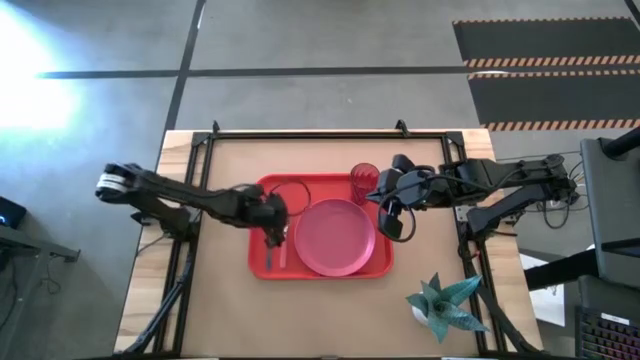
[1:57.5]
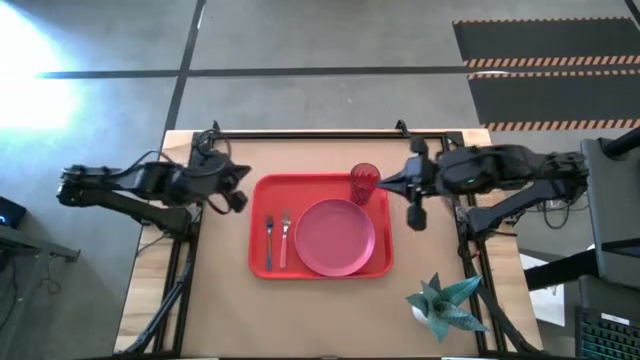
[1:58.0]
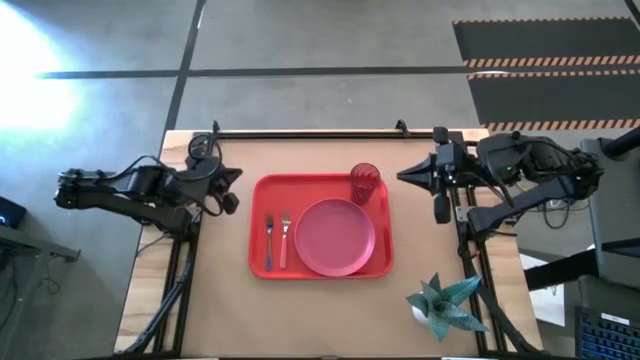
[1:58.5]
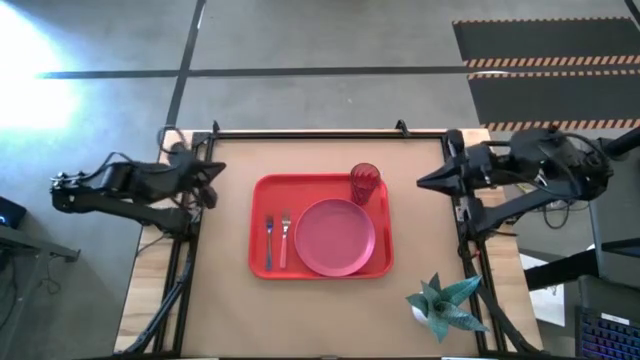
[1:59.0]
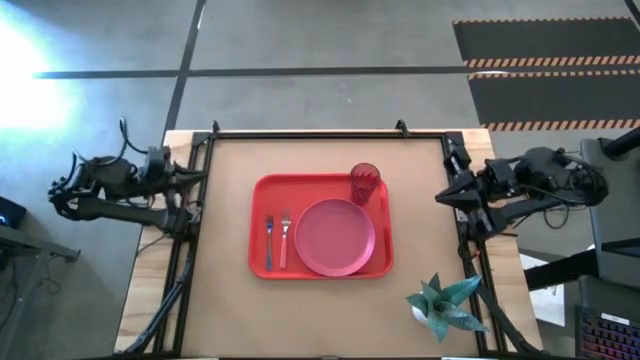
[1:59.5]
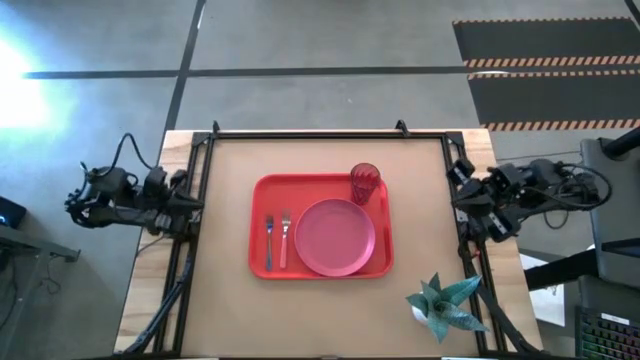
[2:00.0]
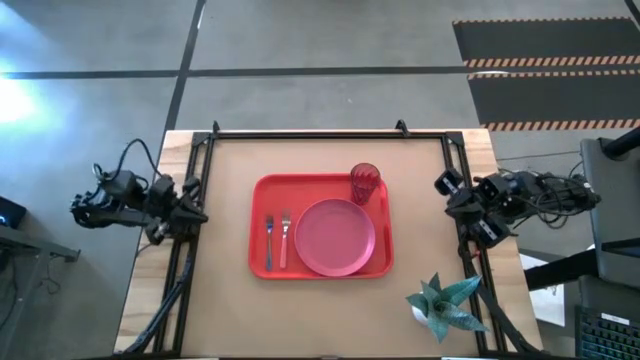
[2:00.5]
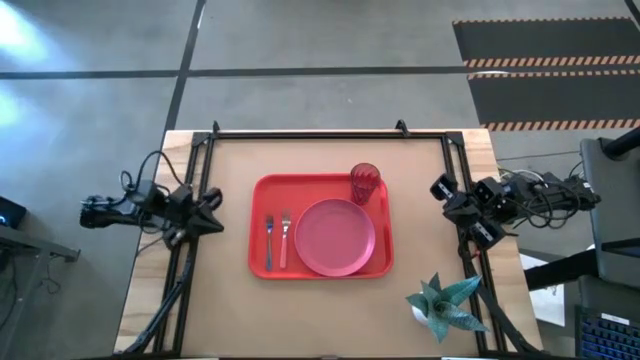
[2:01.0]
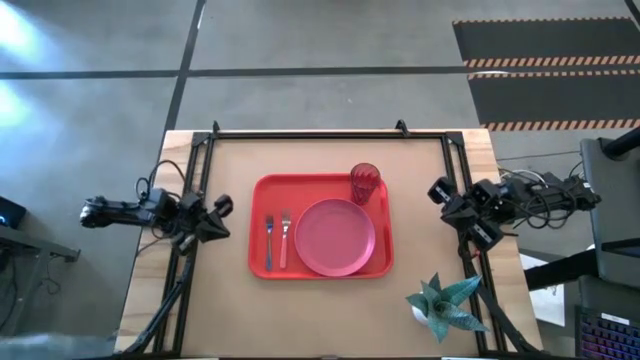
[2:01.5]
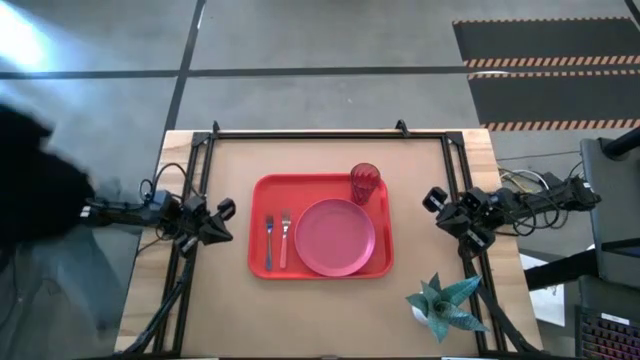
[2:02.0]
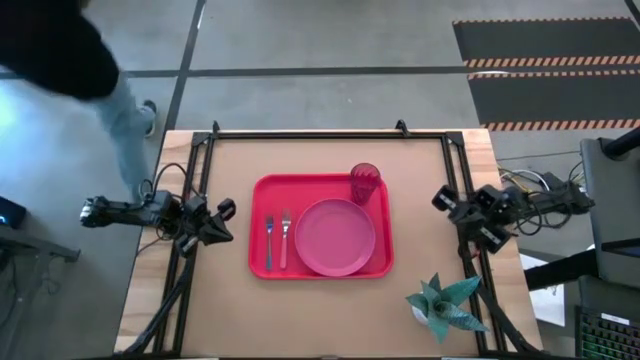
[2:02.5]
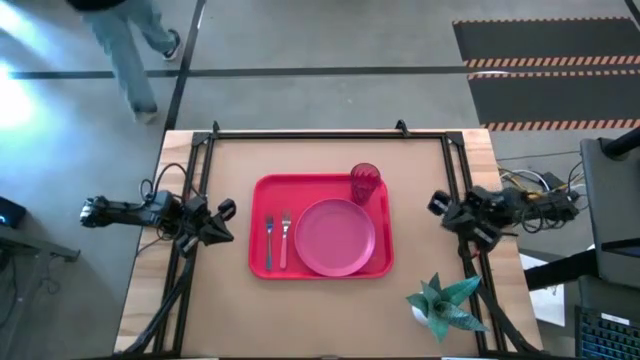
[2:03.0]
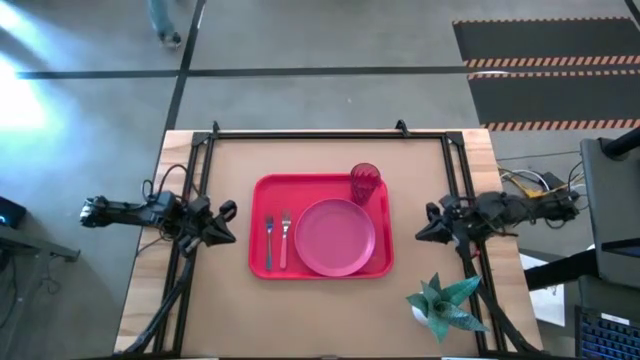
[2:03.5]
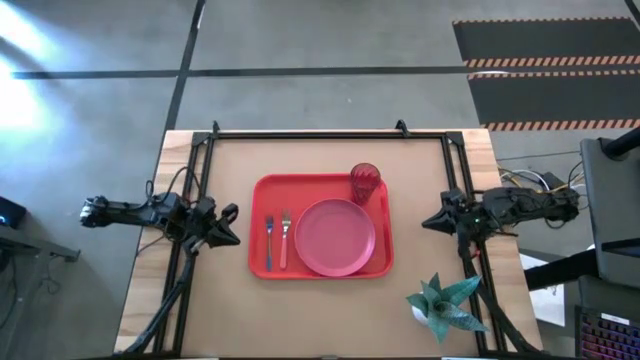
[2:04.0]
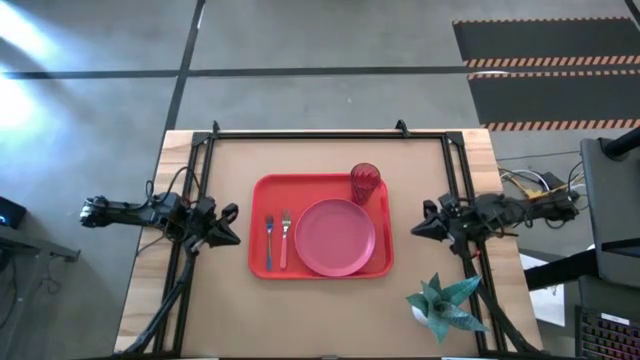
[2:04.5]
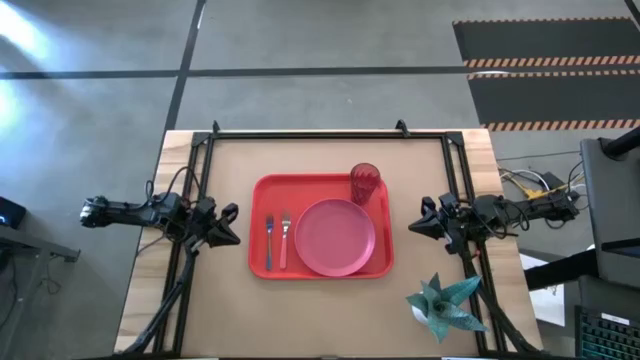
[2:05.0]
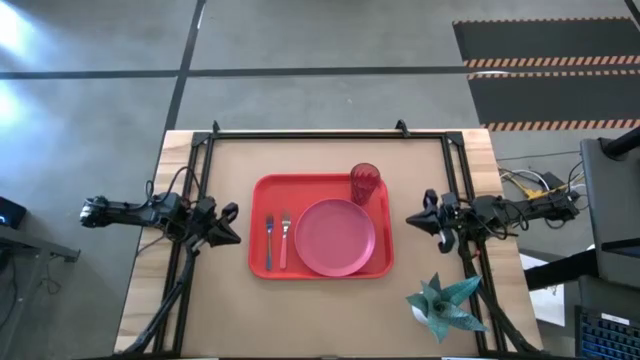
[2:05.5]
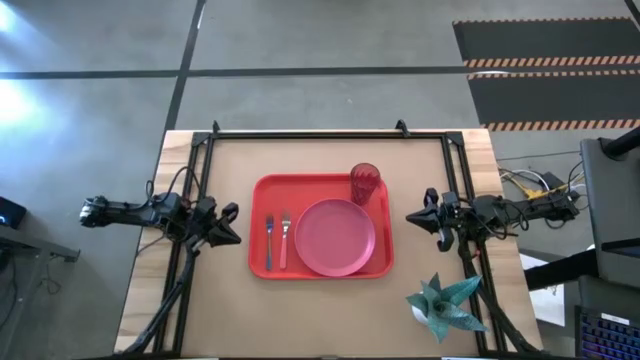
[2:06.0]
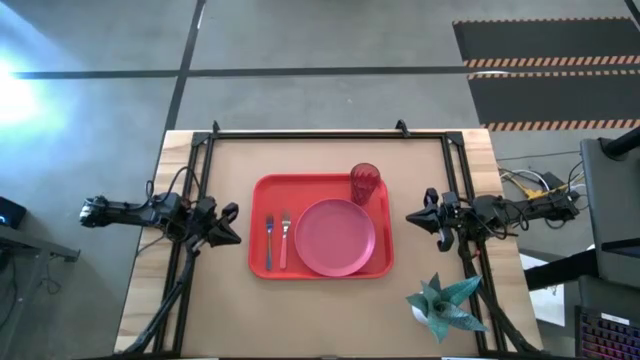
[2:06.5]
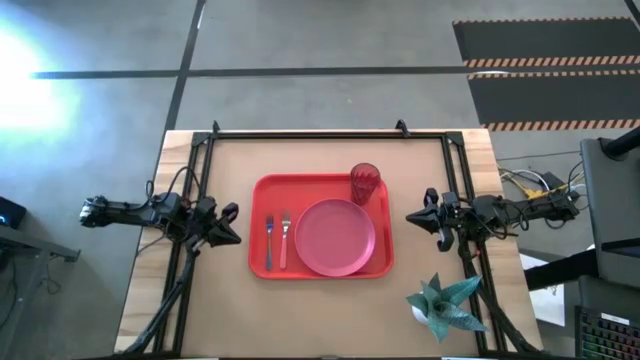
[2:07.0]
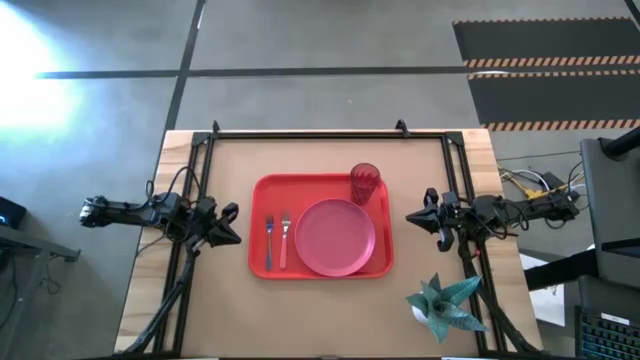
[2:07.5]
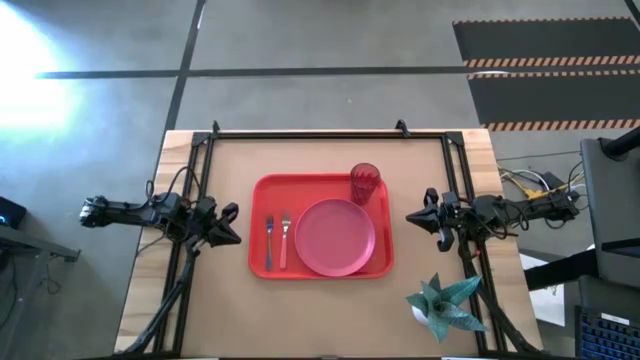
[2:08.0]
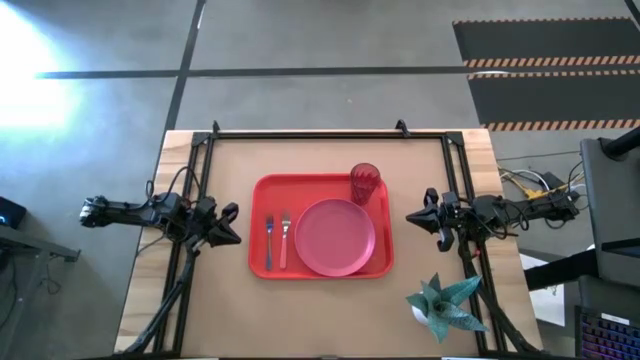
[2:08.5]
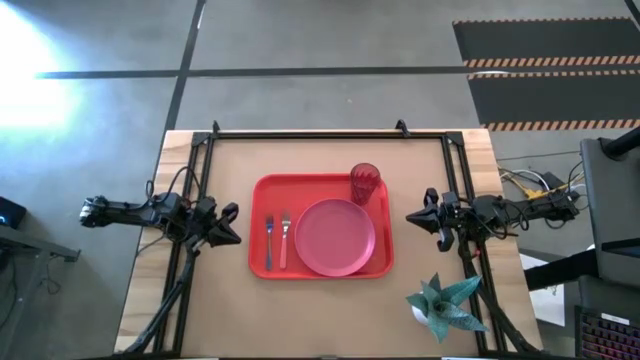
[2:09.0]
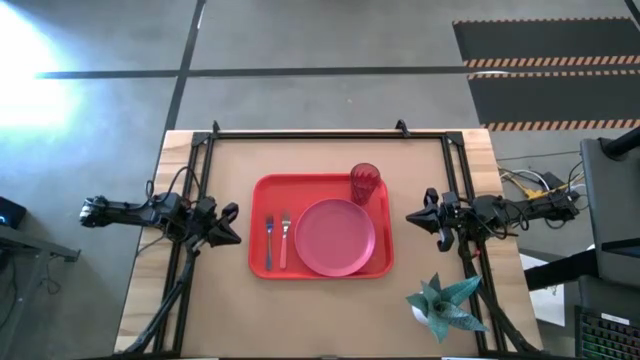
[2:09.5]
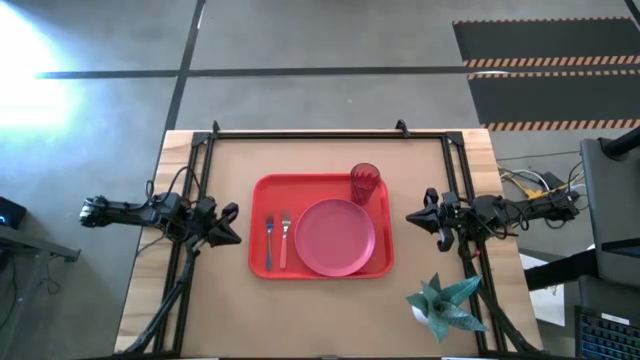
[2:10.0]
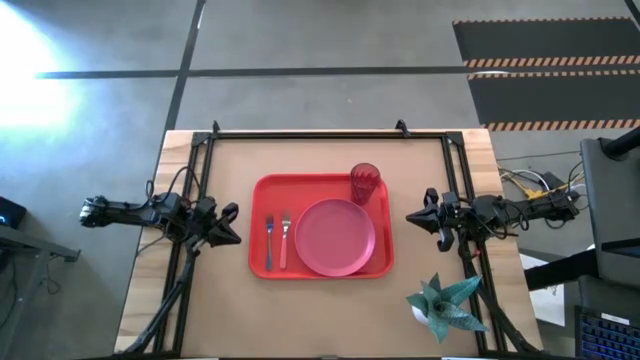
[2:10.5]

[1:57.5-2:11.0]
Task: Pick and place plate/cup/fork/spoon on tray
Return to Home Position

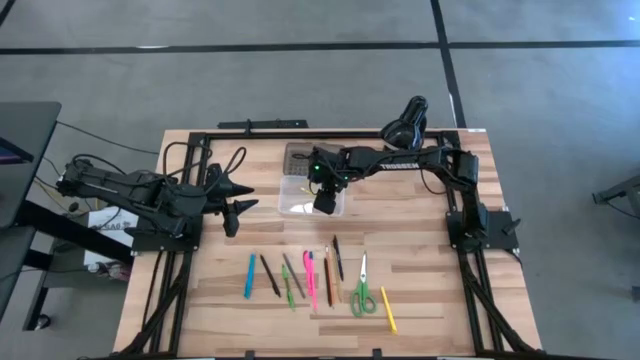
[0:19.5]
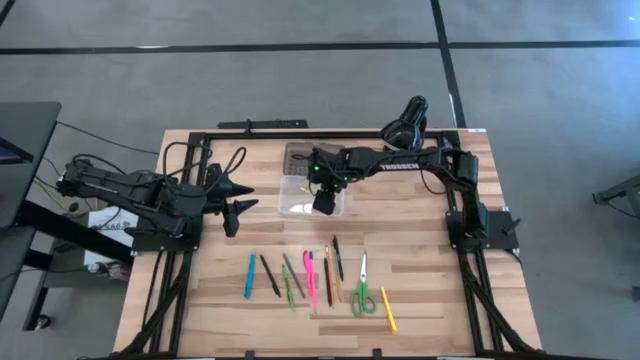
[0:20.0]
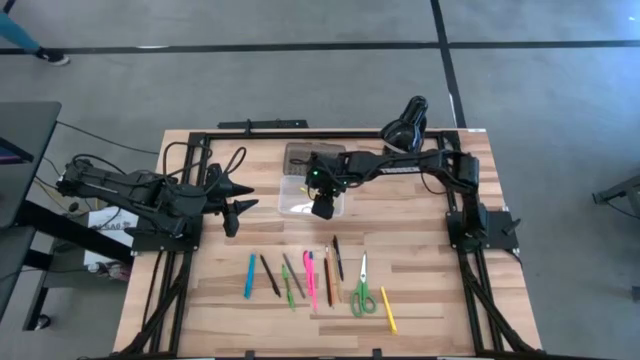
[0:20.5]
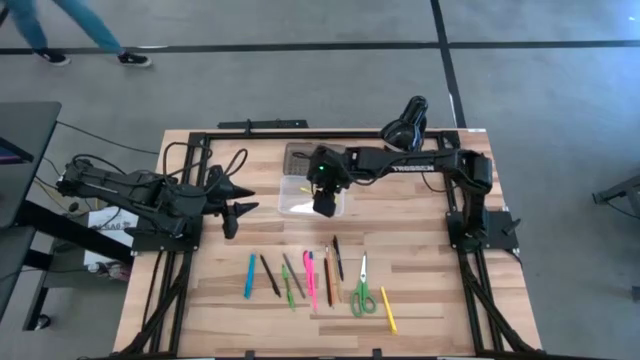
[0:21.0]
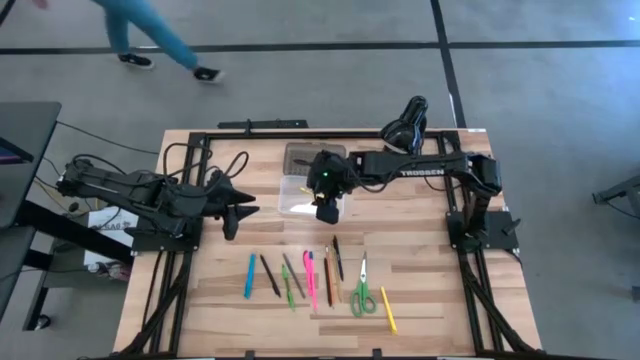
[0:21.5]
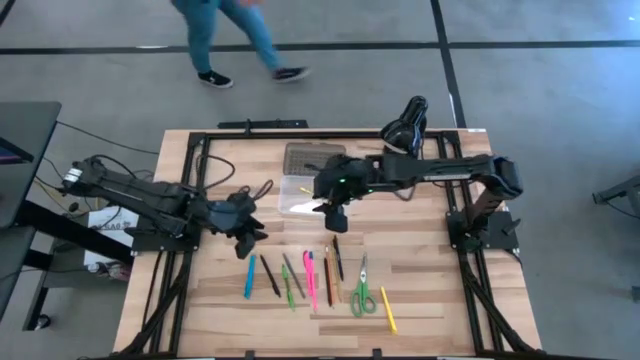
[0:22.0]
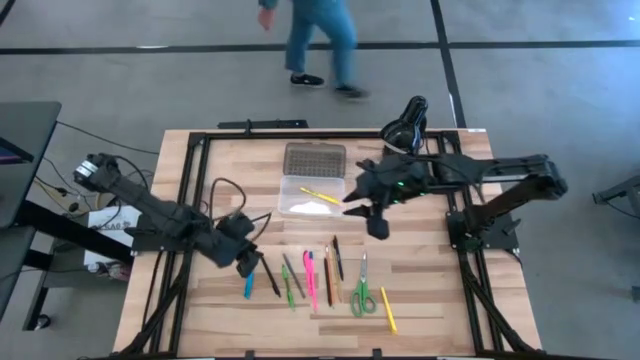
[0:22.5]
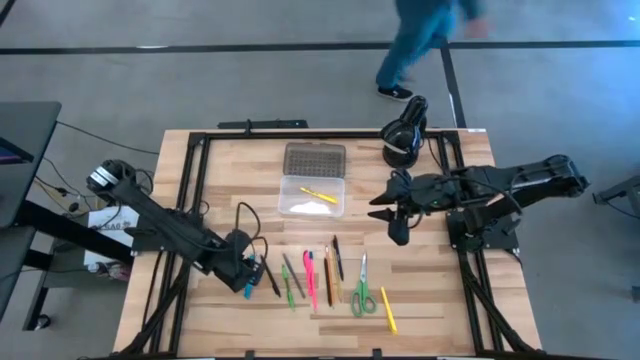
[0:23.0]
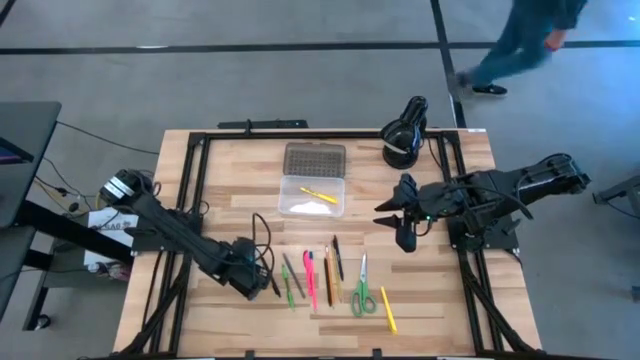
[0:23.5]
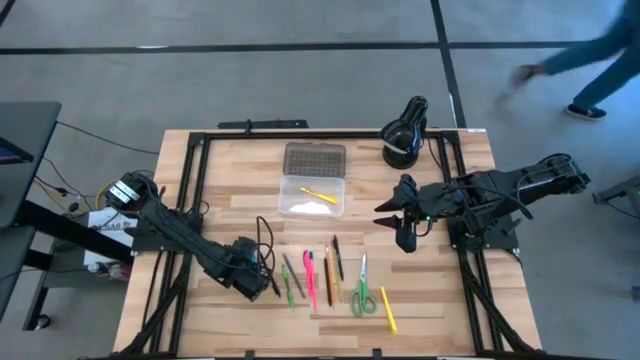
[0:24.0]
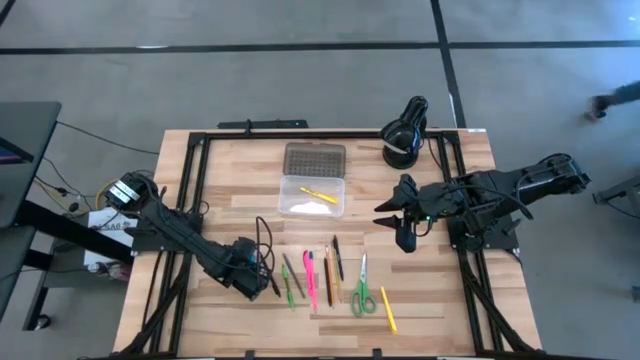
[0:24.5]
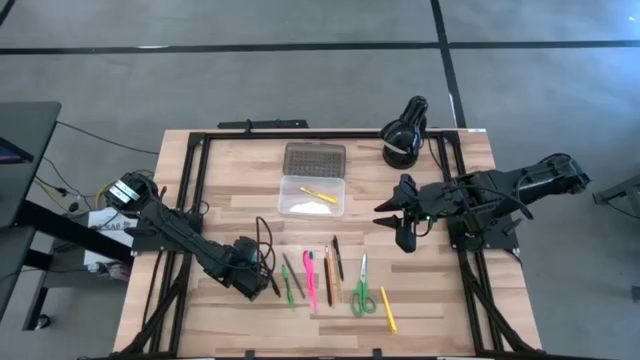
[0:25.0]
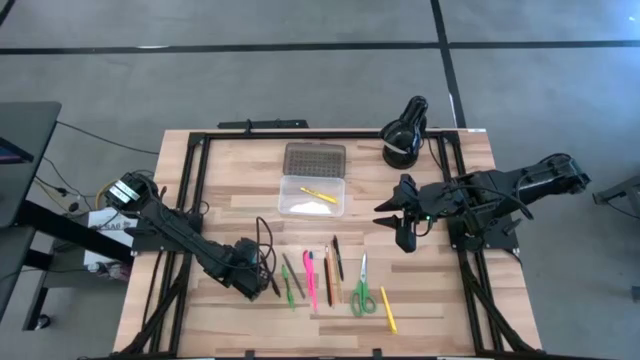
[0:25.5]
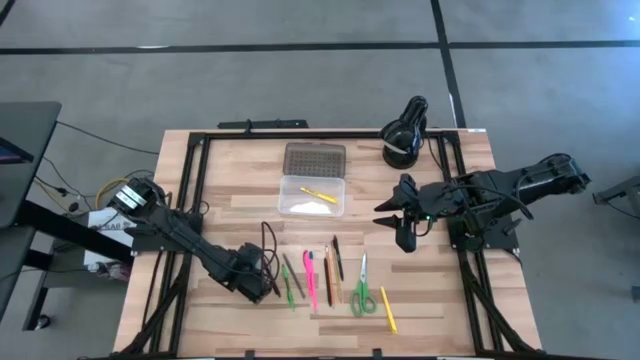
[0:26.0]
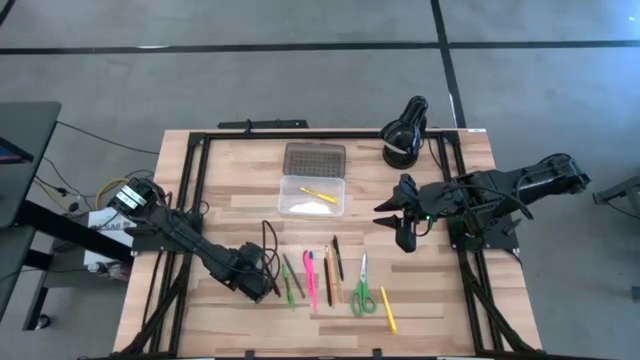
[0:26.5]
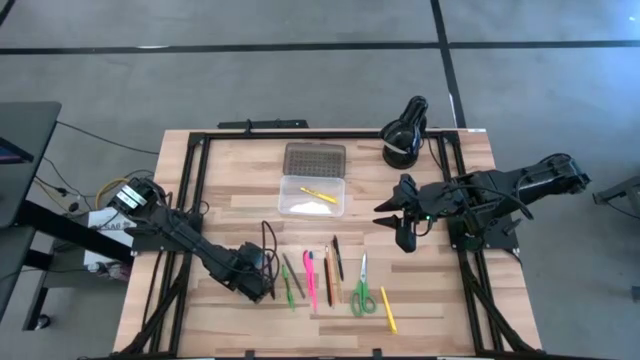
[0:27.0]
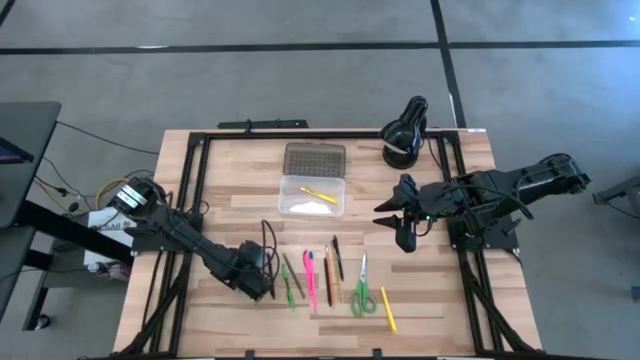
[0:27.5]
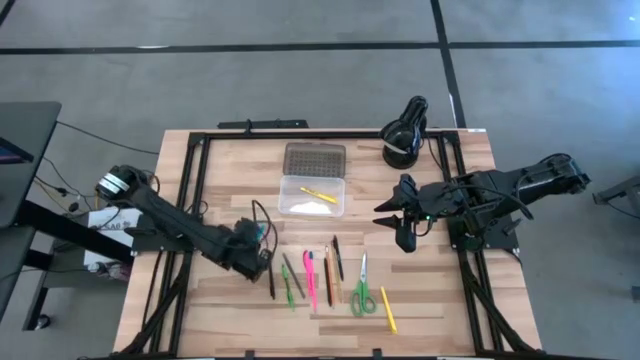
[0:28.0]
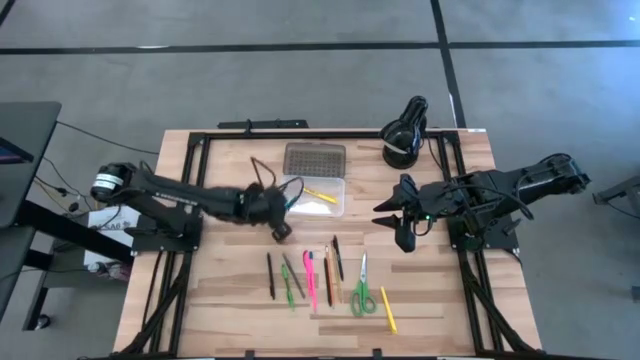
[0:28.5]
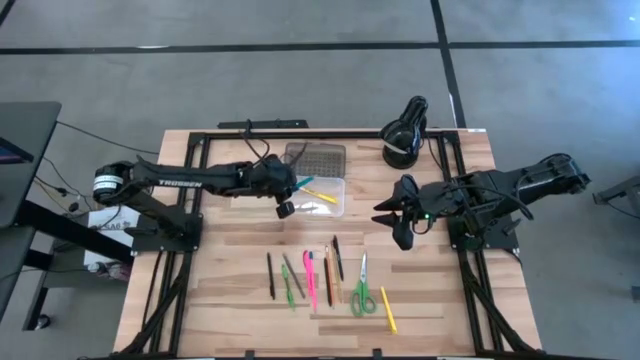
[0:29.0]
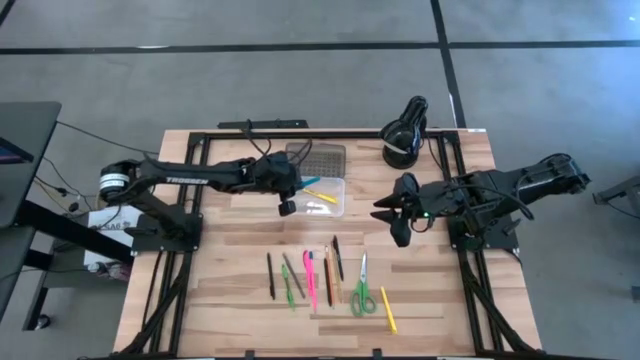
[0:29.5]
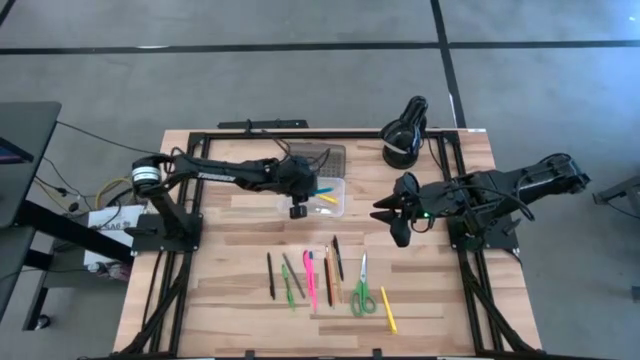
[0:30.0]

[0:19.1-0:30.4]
Task: Pick & place school supplies into a supply box
Put the blue pen into the supply box
